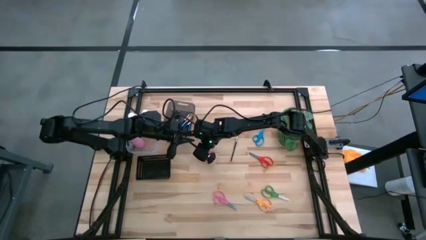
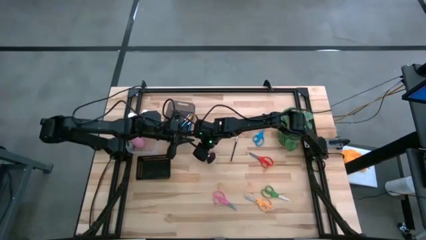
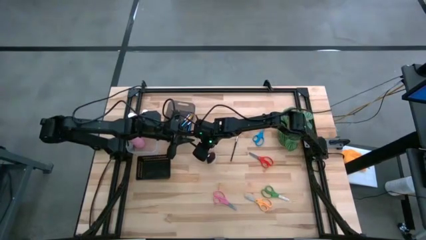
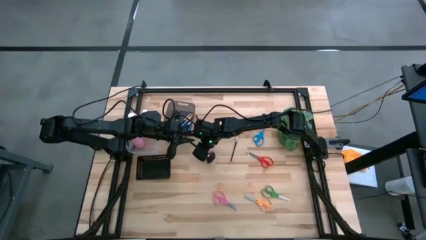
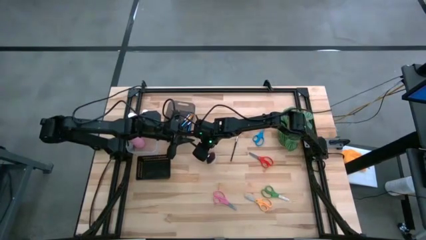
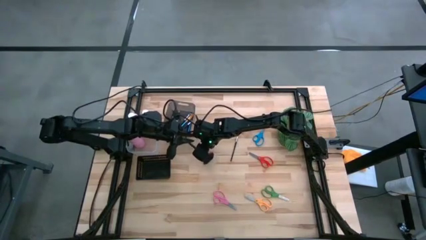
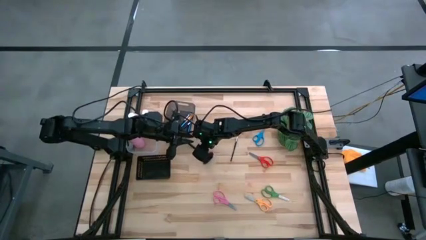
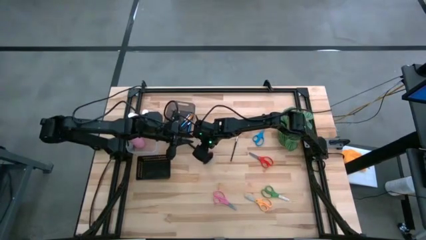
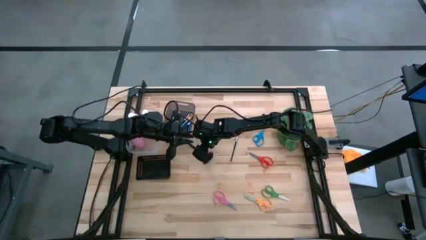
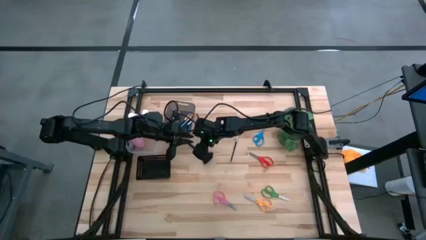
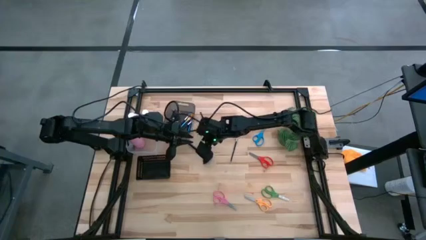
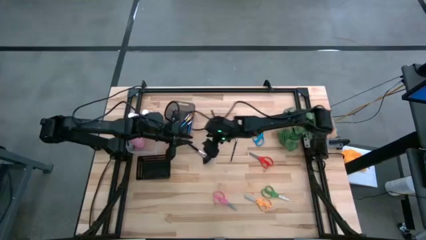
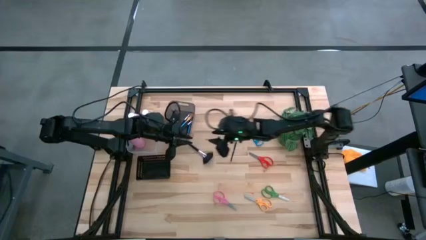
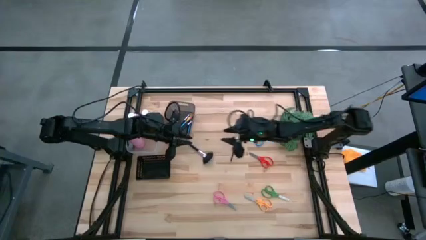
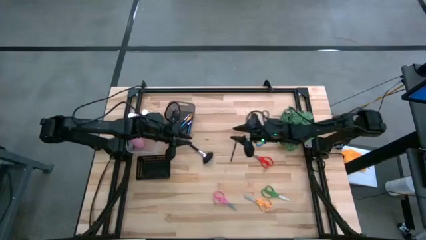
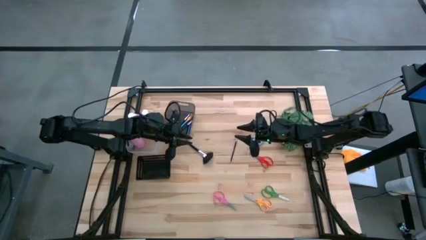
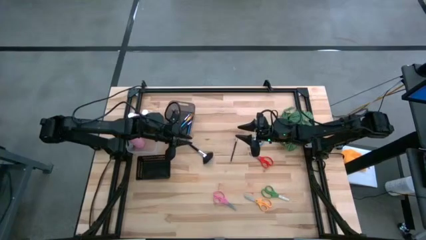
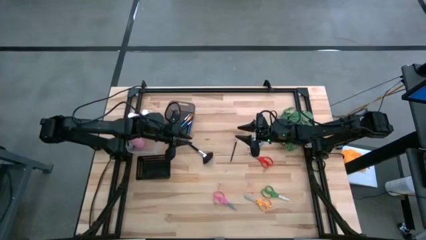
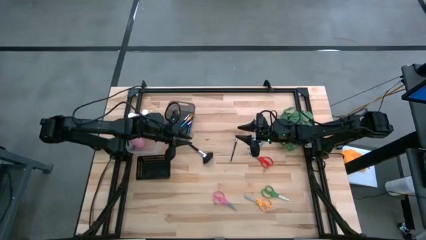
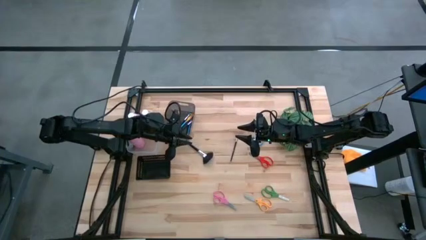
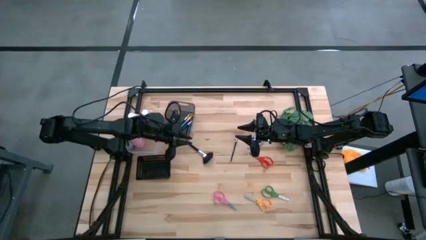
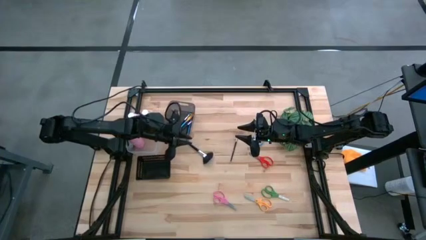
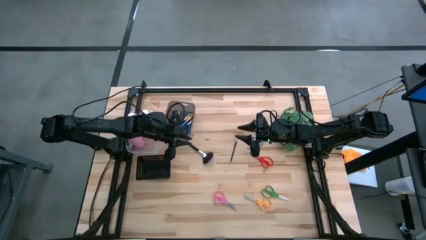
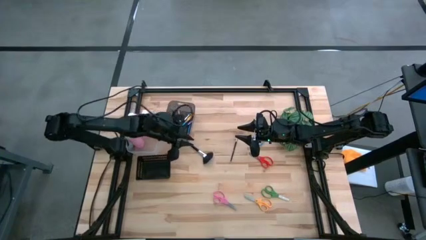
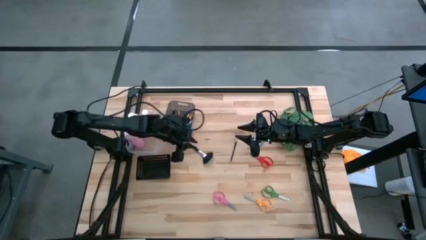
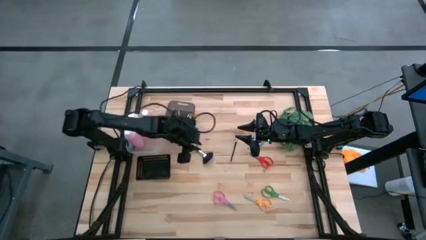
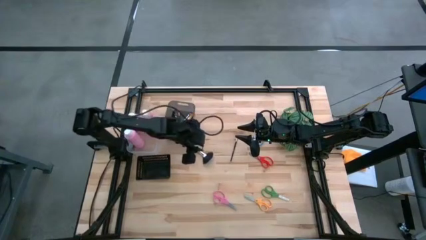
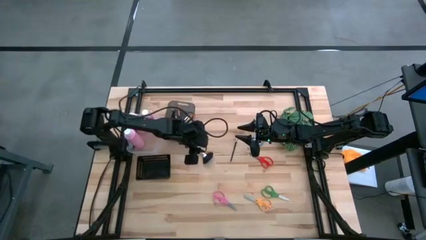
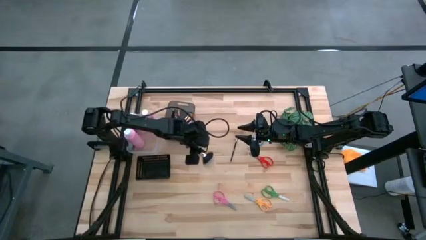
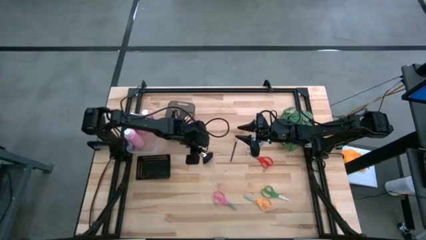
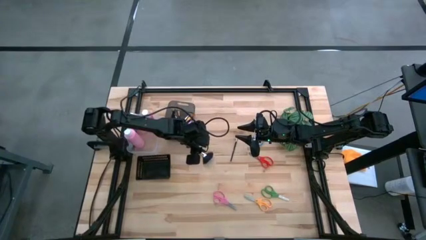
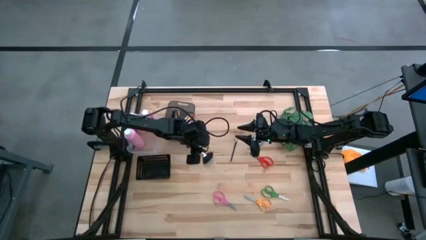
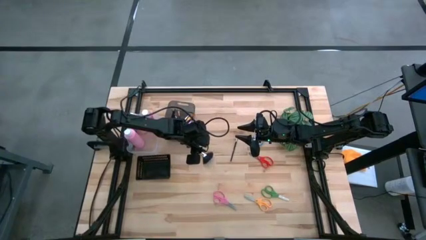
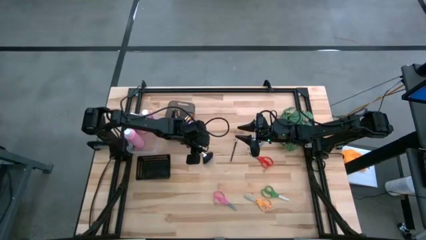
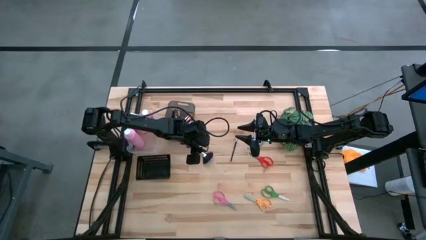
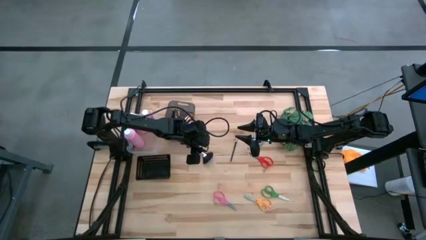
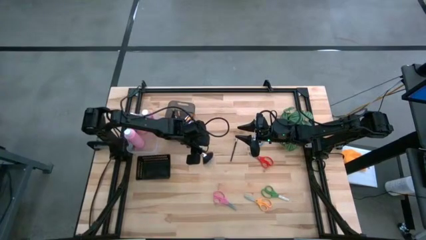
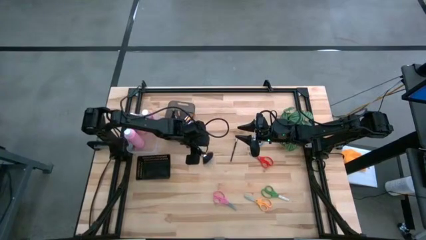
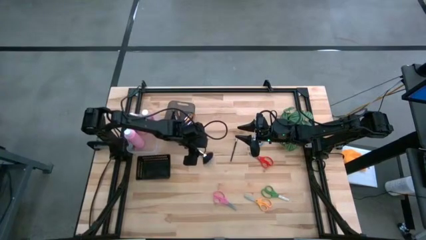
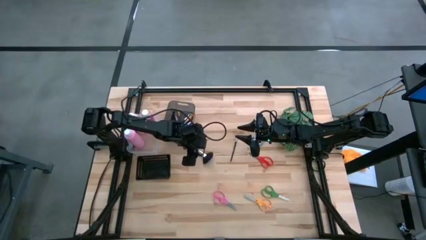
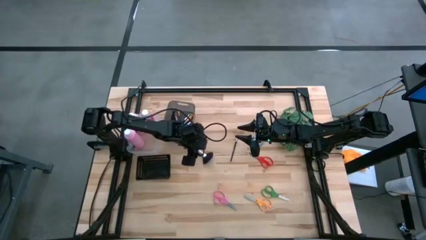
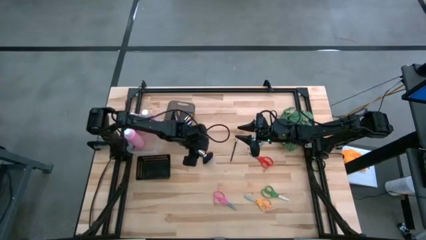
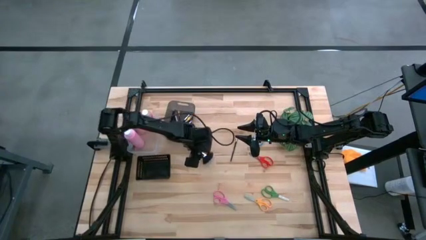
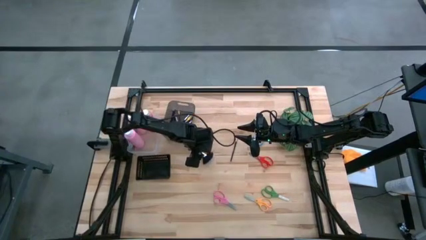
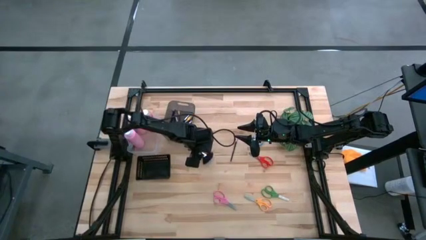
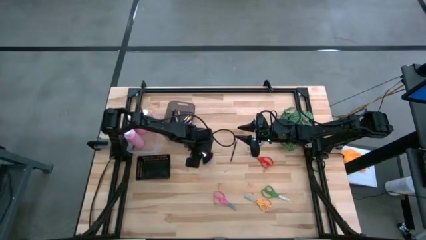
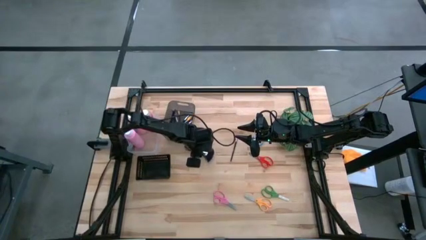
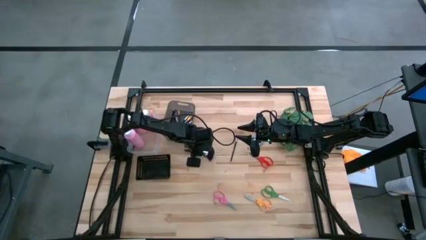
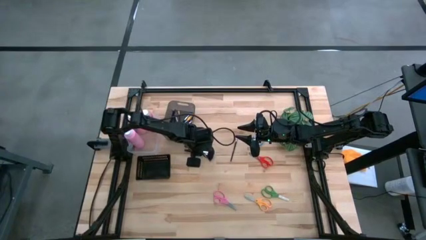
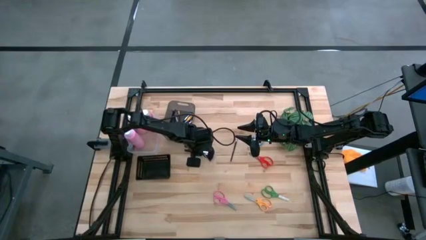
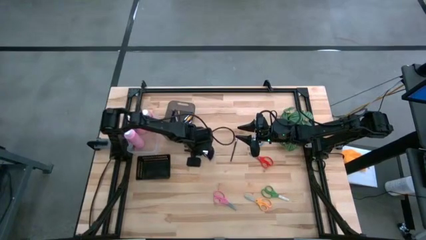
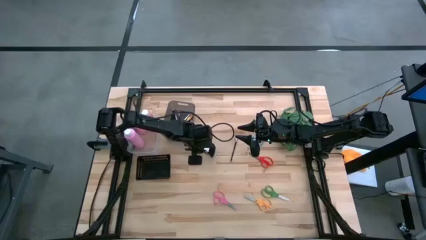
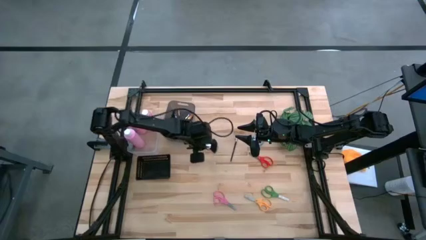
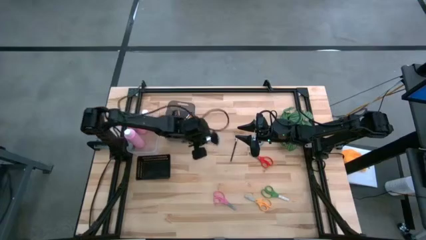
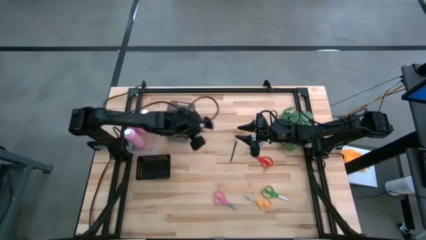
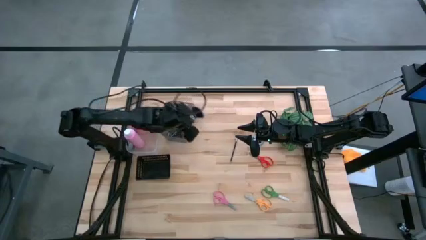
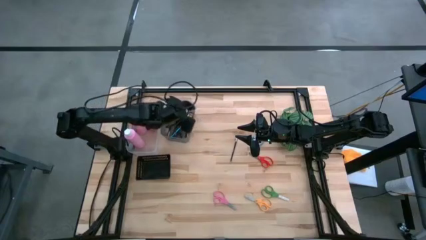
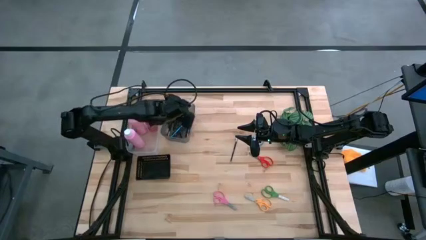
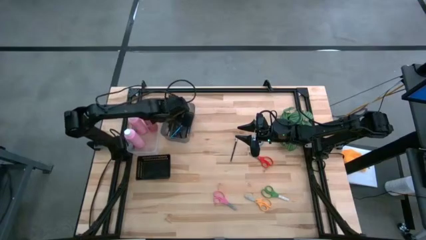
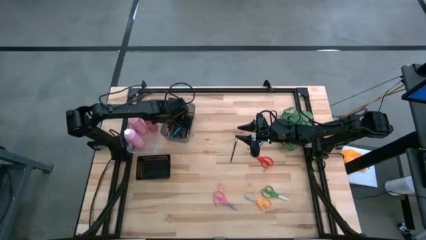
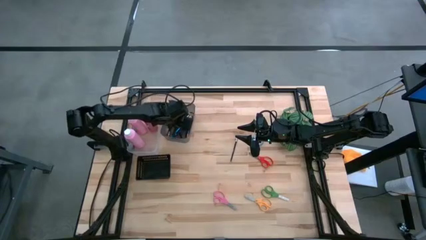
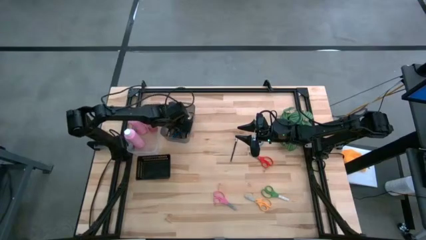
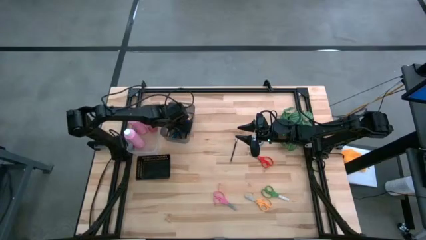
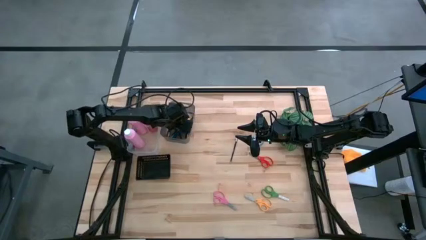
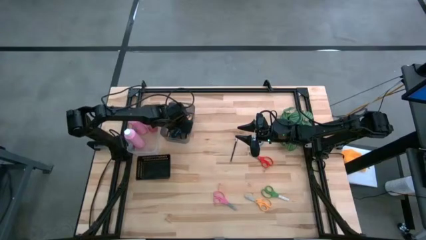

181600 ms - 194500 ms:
Task: Pick & Place Paint Supplies
Put the black brush into the black bin
